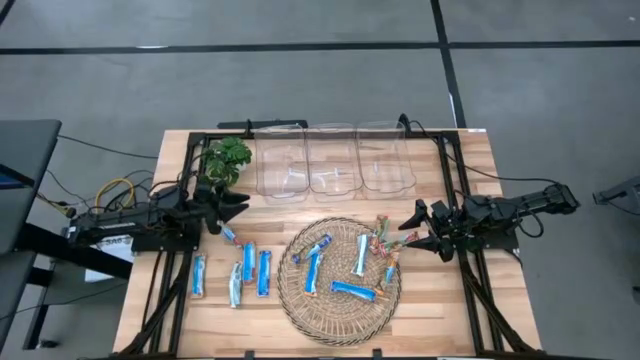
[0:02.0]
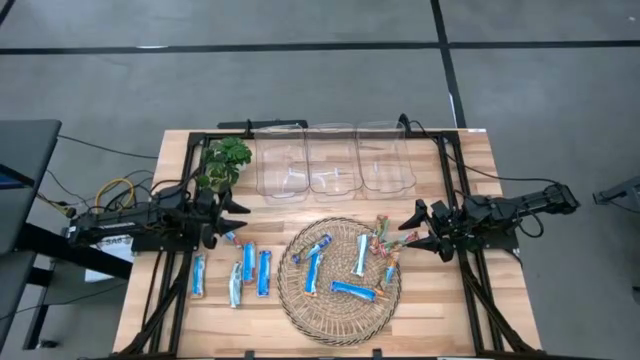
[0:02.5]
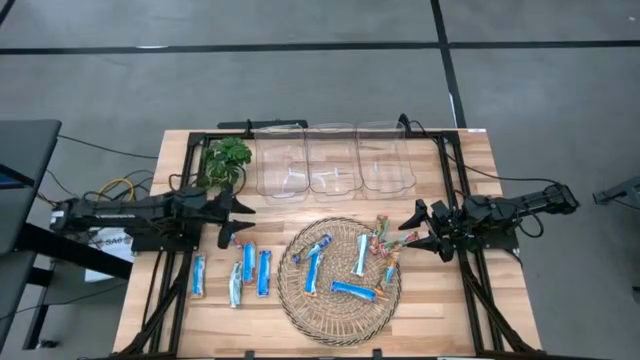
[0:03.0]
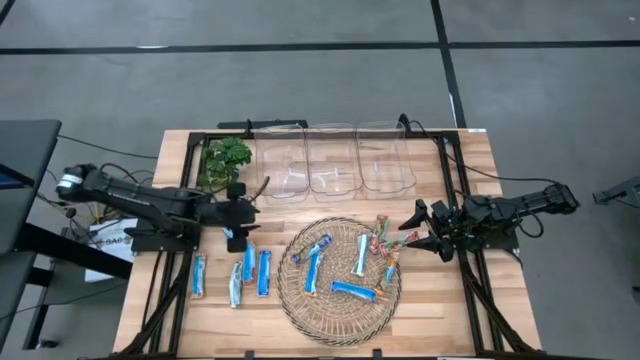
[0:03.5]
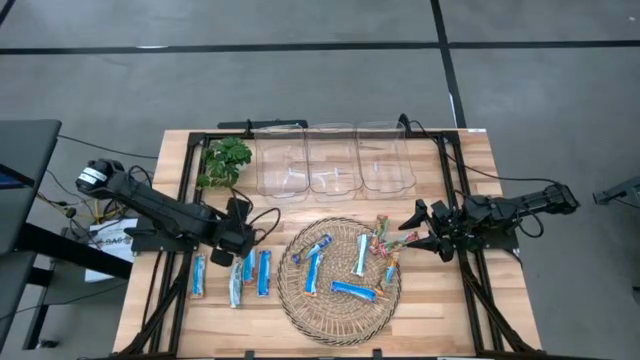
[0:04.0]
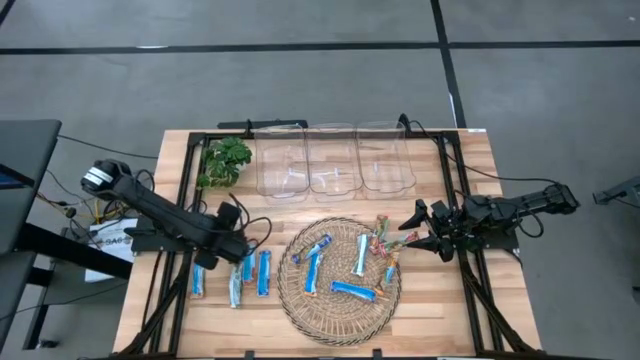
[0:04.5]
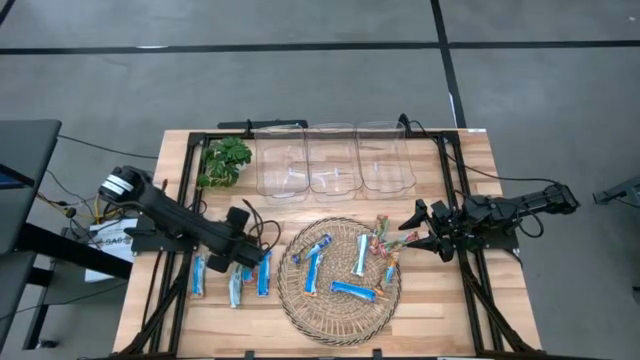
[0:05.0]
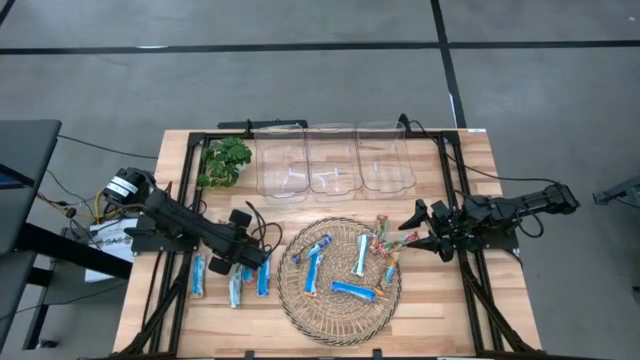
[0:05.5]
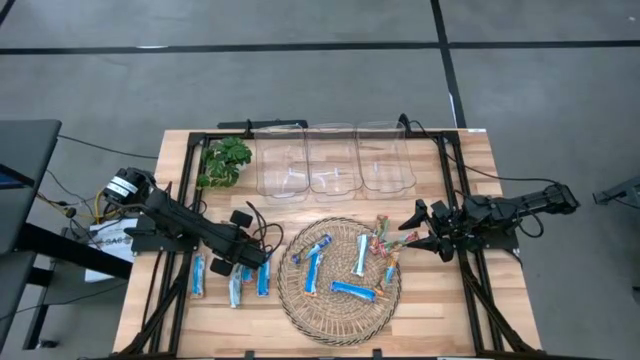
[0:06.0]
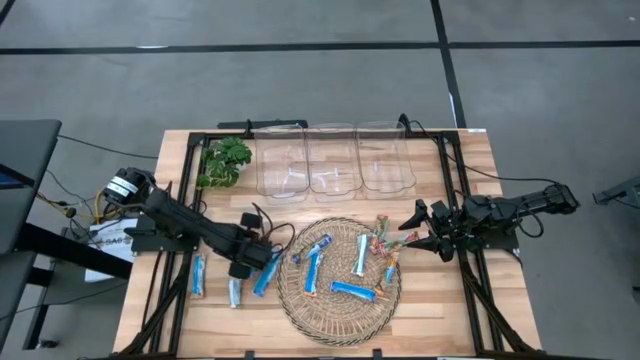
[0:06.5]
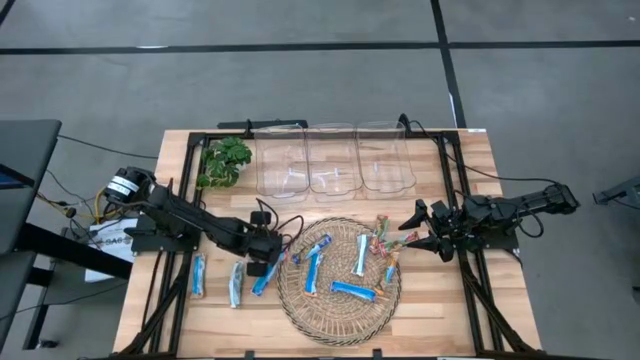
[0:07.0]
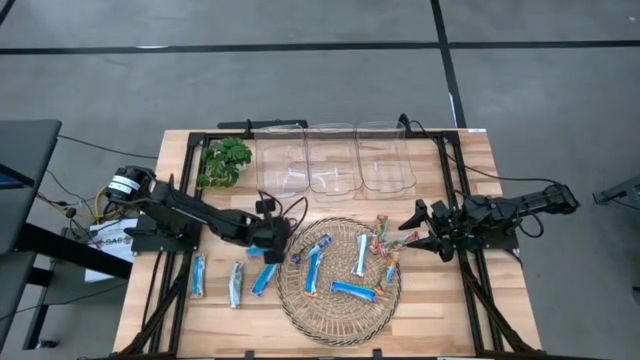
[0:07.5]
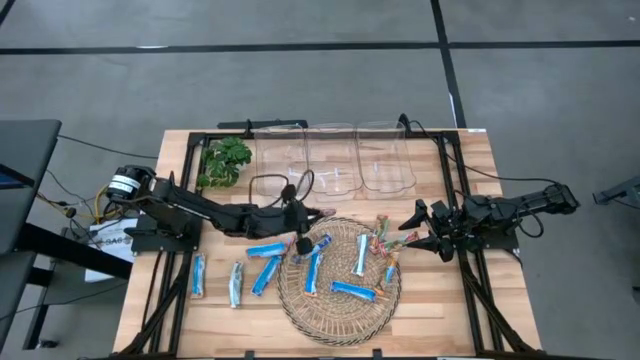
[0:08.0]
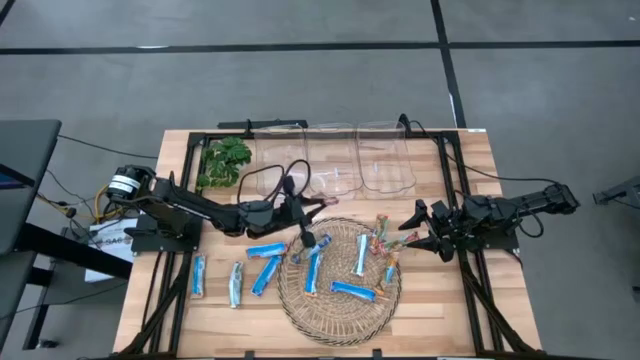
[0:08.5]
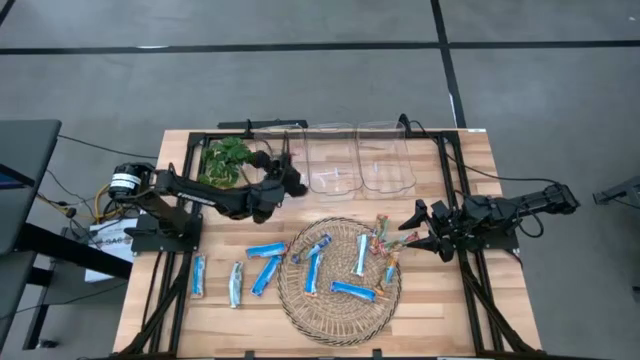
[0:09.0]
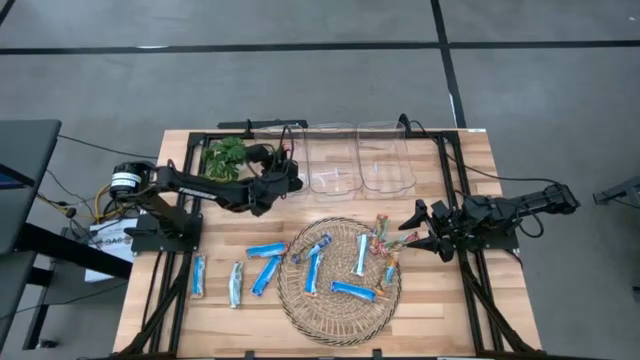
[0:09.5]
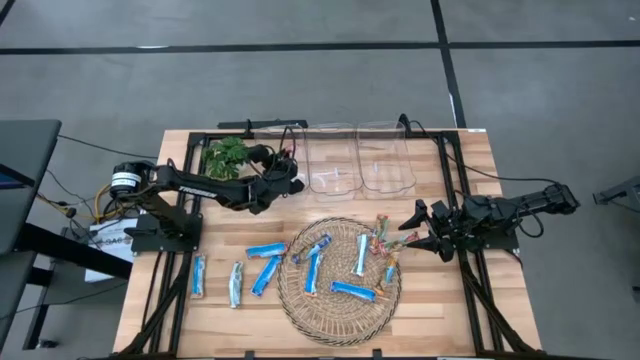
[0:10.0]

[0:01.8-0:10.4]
Task: Pick and place Granola Bars by type
Put the red granola bar into the left transparent bin

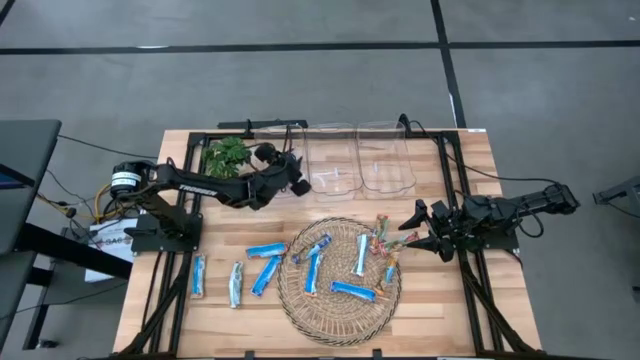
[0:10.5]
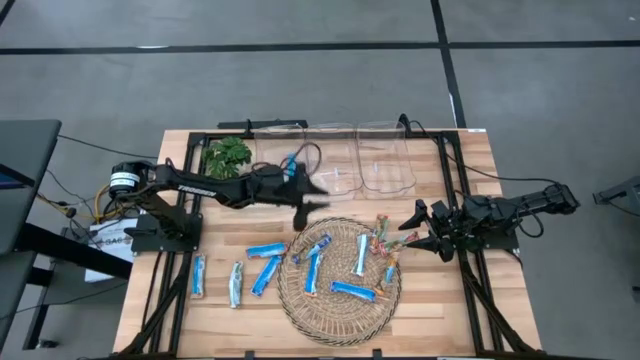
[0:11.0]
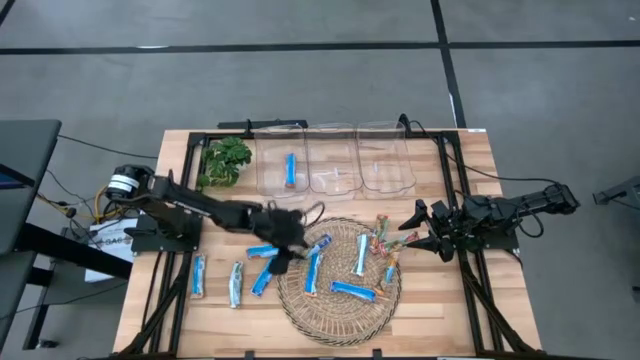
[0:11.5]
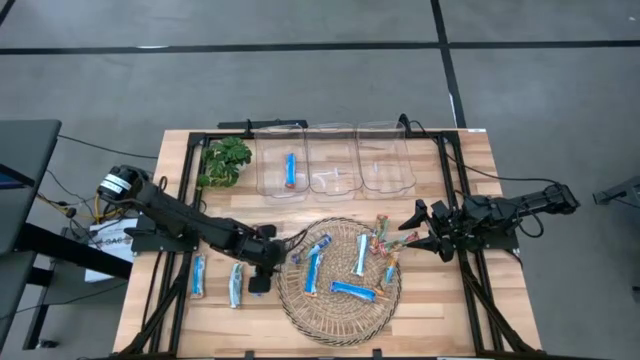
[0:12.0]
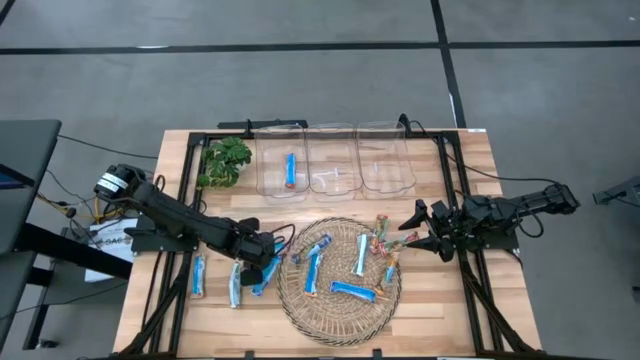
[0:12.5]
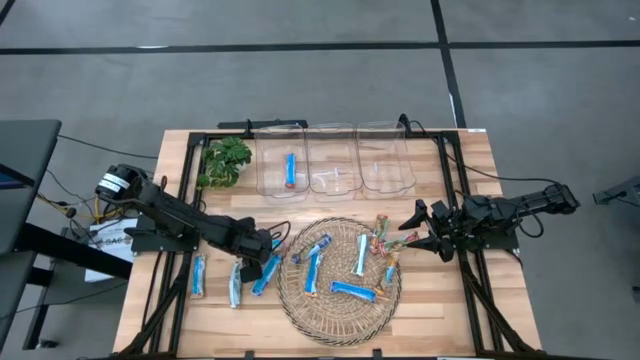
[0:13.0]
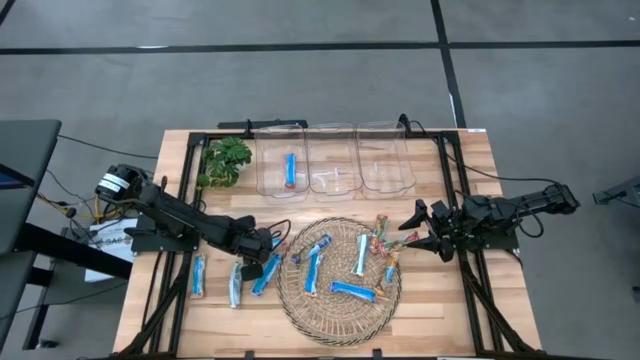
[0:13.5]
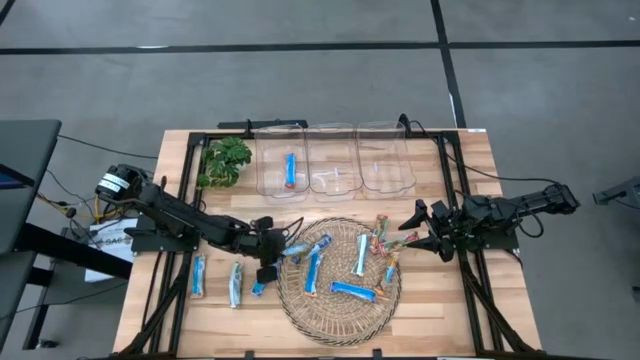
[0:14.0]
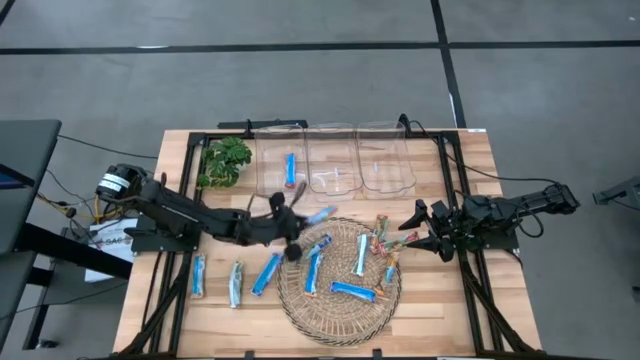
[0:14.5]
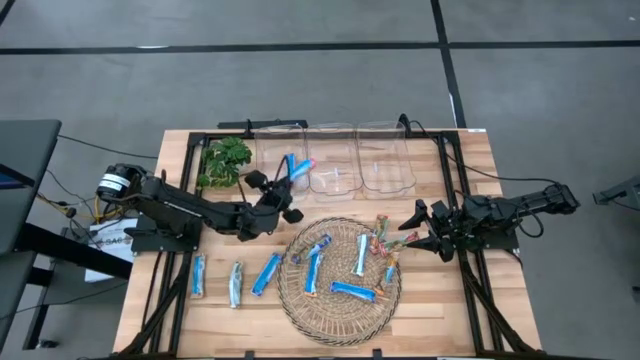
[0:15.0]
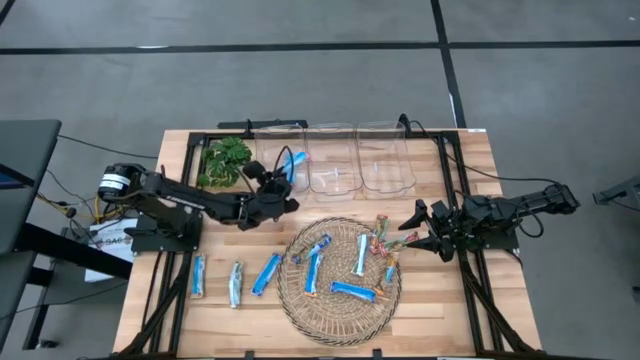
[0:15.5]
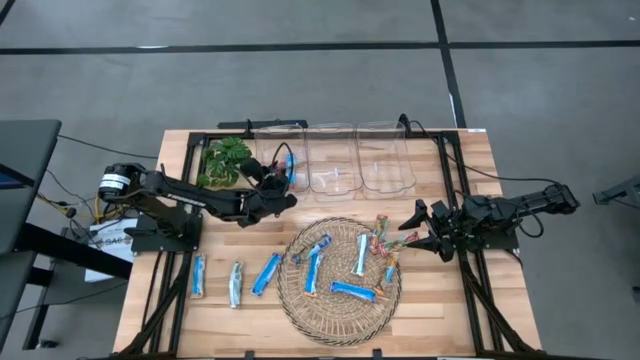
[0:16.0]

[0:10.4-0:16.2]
Put the red granola bar into the left transparent bin

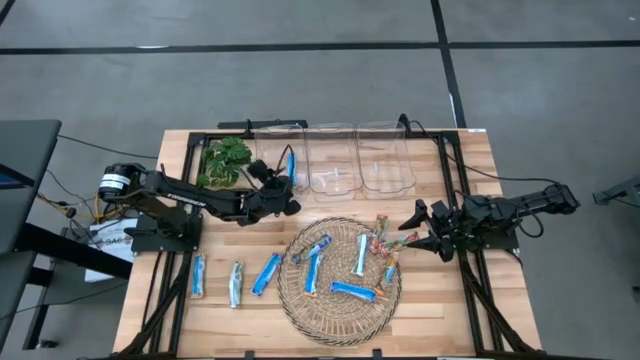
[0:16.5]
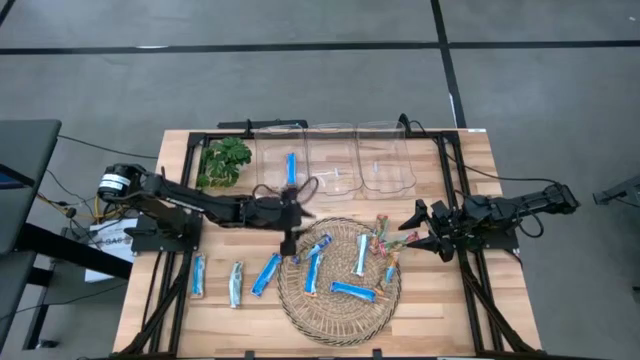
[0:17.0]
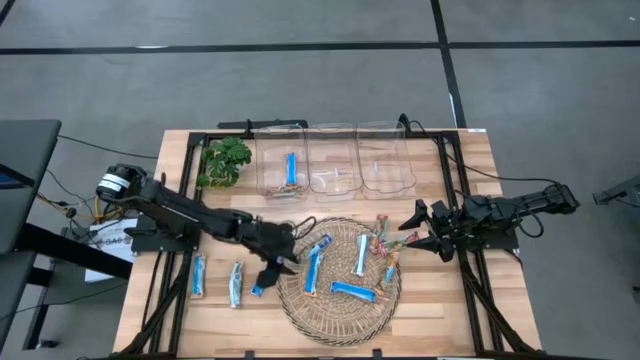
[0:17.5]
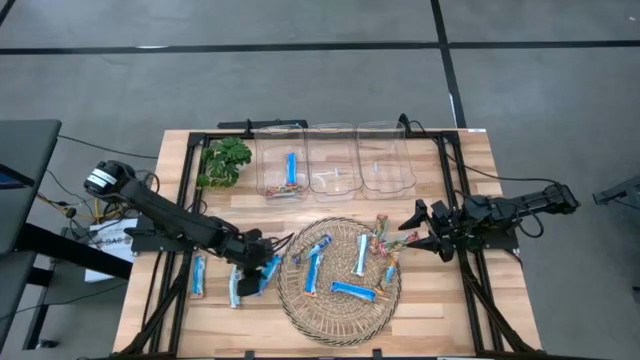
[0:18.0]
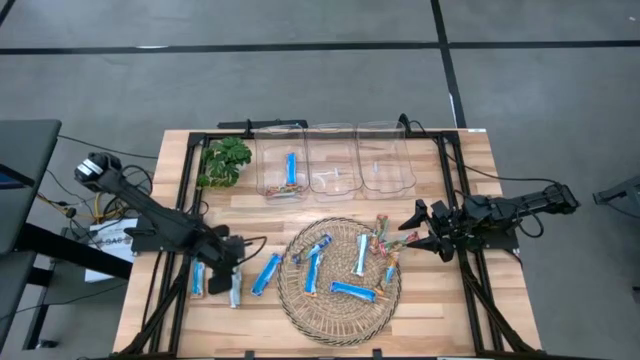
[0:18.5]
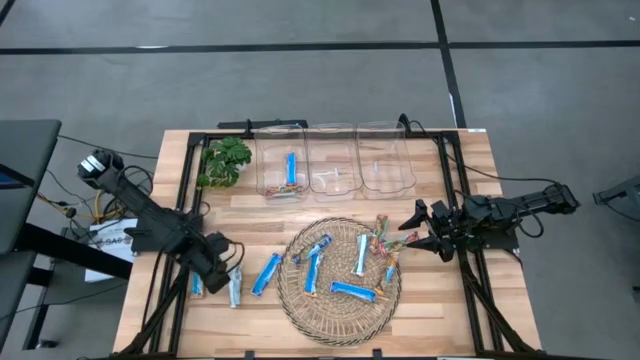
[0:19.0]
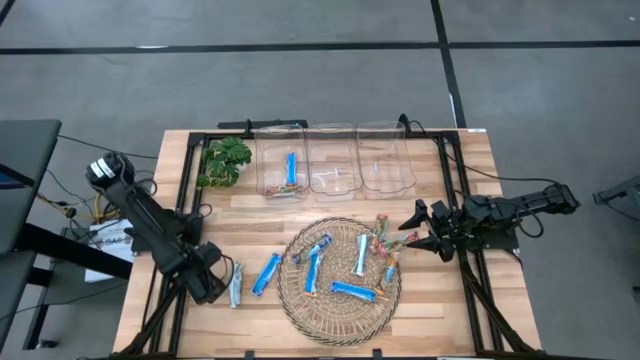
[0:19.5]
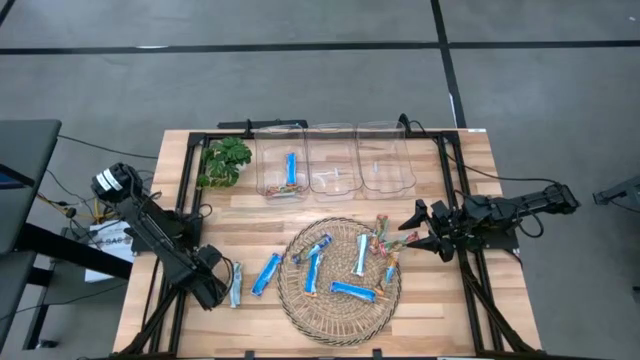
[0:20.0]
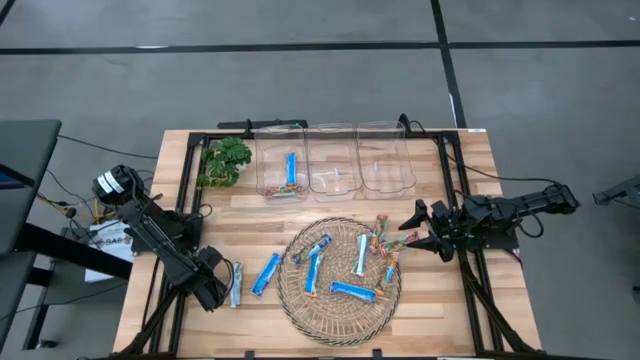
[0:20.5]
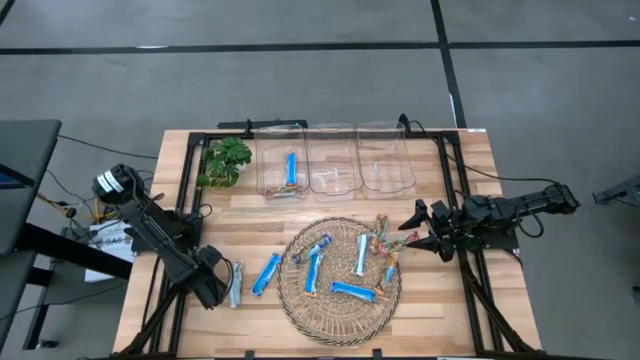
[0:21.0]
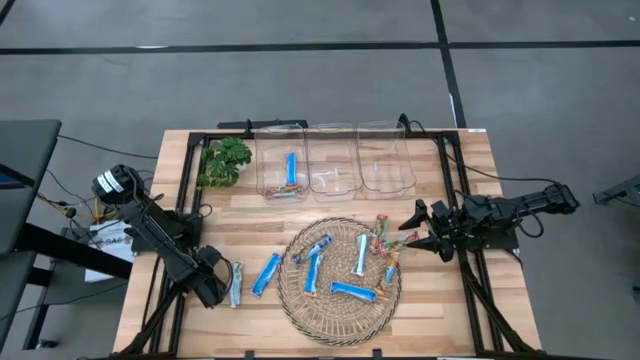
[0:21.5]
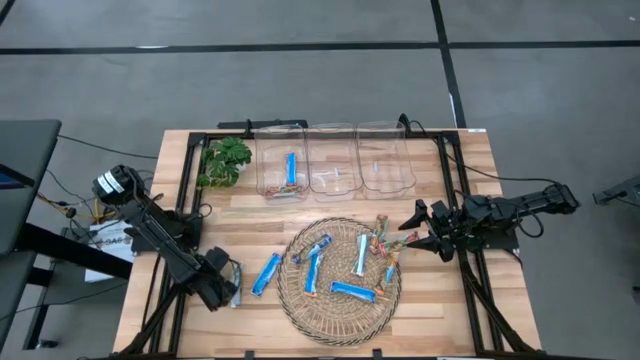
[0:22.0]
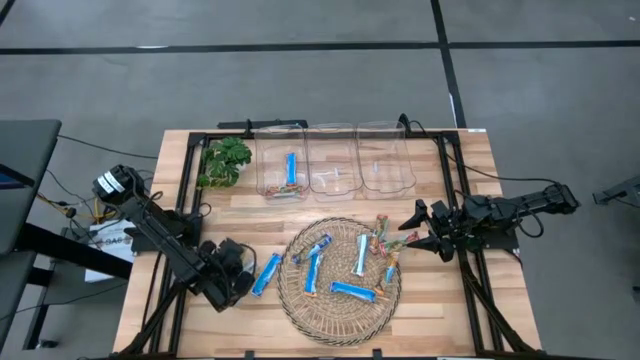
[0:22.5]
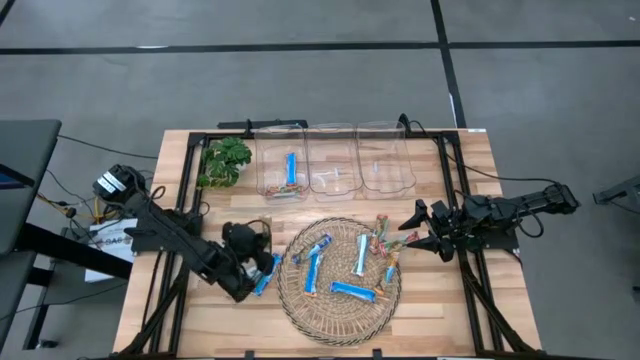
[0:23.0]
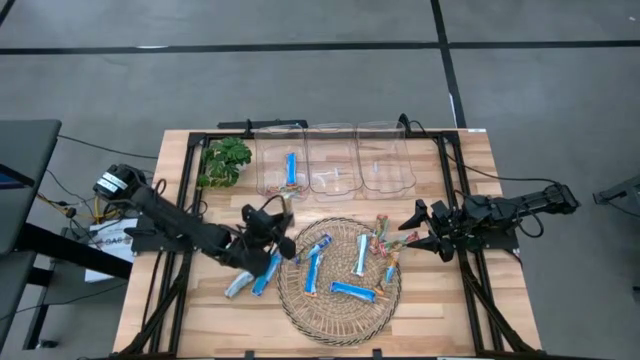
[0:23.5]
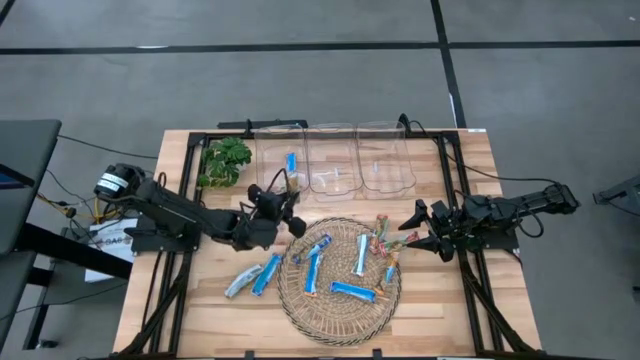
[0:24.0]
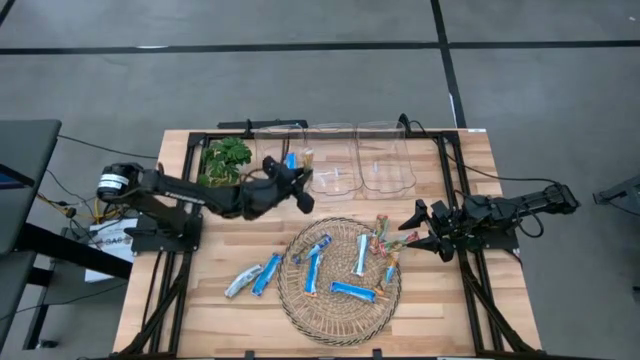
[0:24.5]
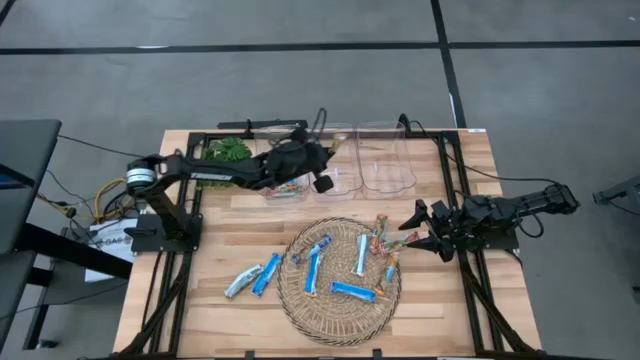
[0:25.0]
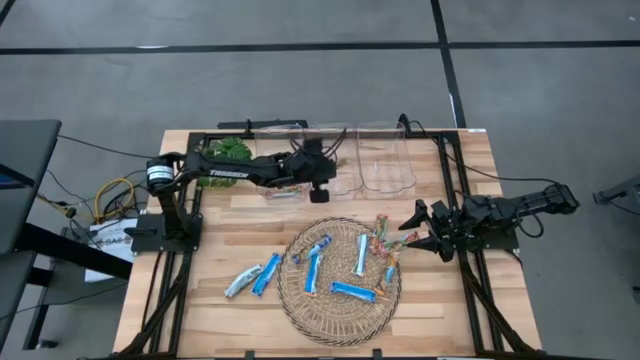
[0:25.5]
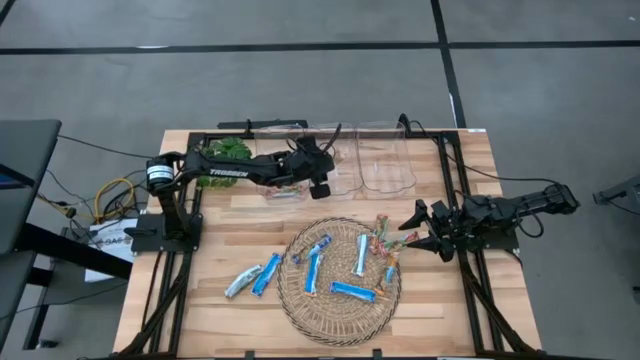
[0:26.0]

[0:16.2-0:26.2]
Put the yellow granola bar into the middle transparent bin
